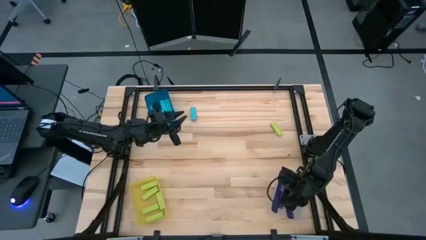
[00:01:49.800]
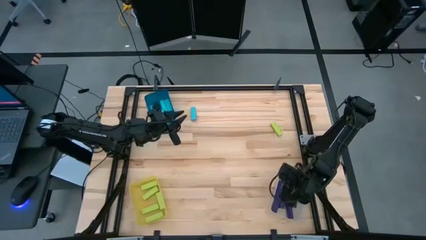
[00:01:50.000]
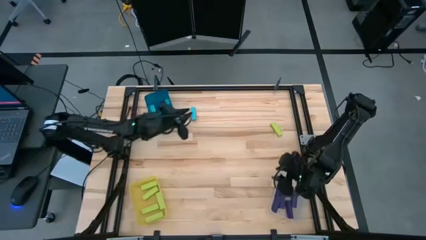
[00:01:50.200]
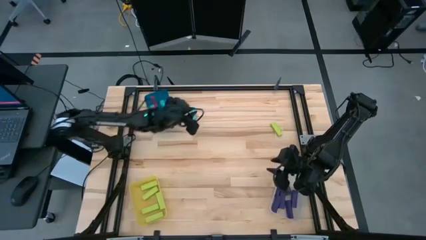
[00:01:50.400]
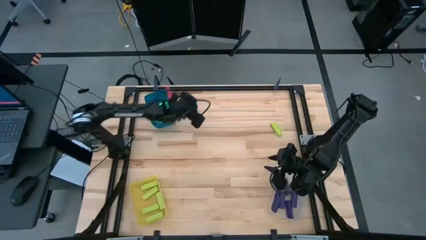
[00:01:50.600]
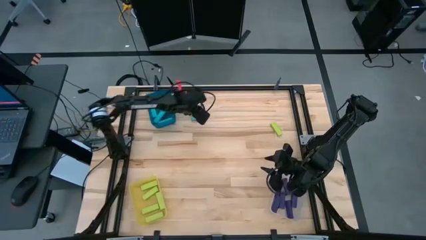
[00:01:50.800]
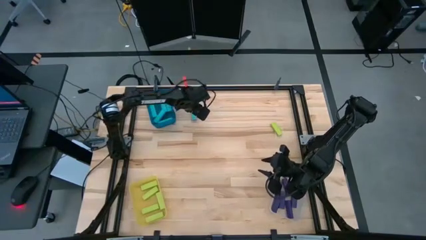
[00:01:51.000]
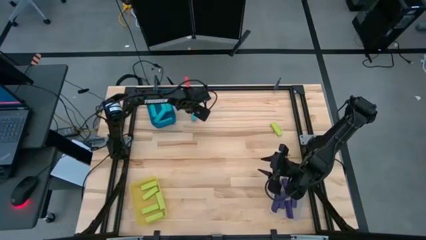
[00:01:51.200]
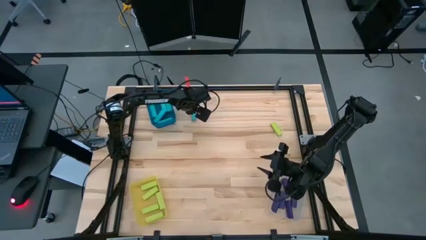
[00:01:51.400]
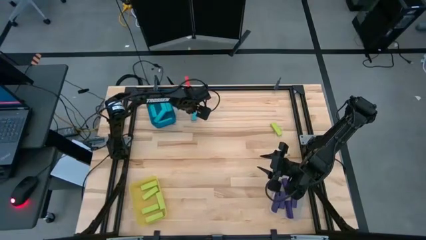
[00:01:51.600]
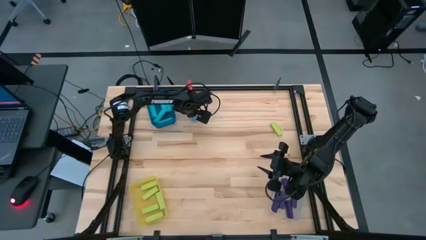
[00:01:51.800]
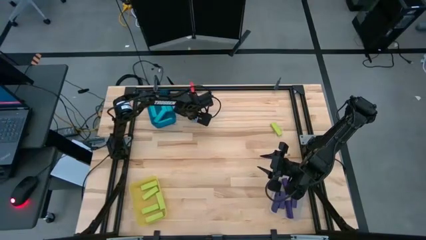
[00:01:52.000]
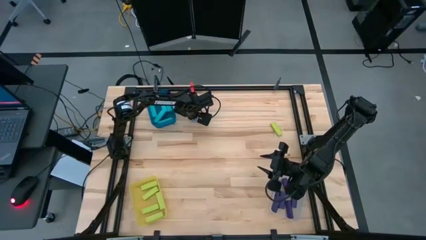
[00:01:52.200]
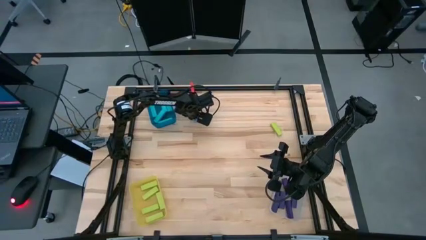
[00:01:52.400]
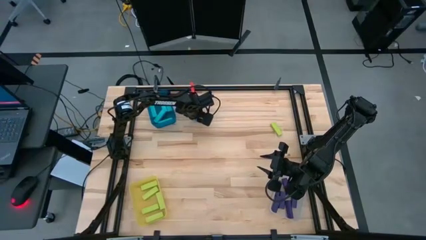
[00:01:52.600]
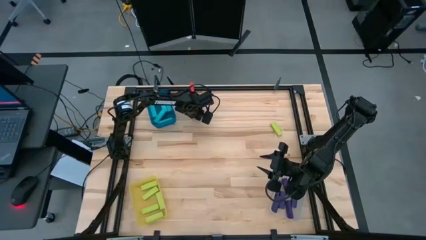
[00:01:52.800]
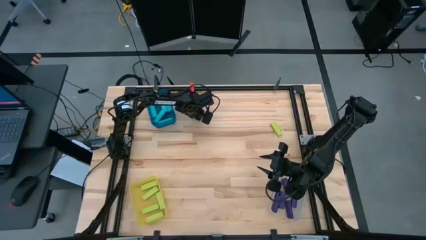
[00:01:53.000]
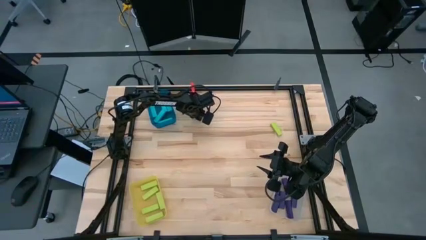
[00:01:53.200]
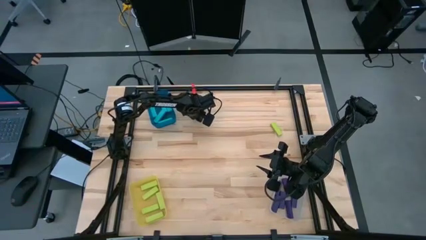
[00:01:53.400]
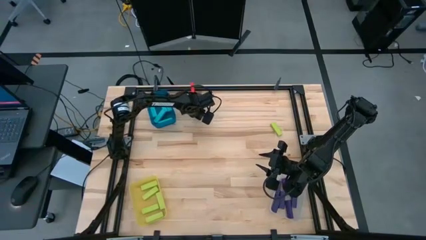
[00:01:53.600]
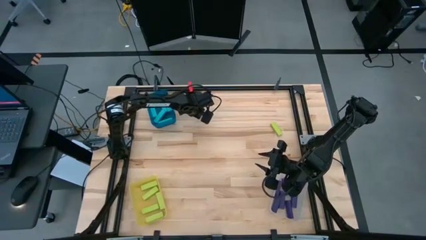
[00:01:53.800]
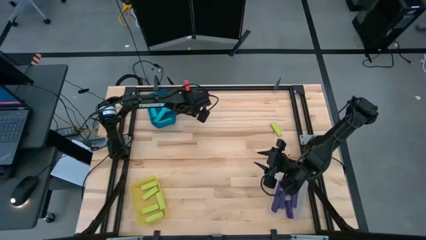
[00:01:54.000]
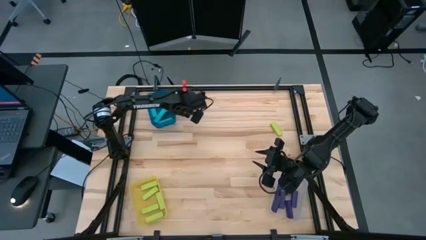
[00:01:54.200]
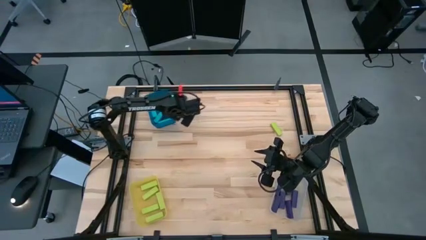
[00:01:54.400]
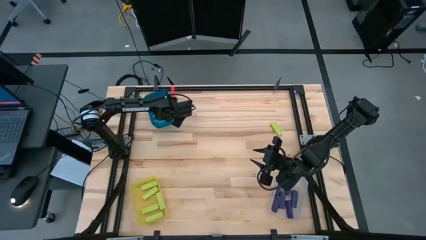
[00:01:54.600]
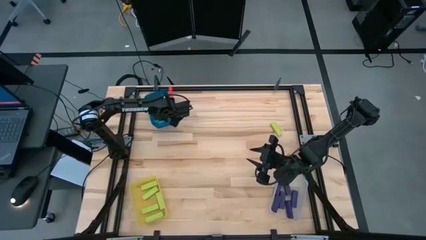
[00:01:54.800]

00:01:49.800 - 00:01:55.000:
Task: Sort blocks
Put the blue block into the blue bin

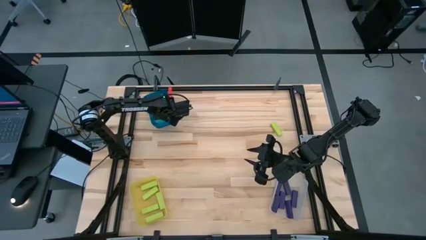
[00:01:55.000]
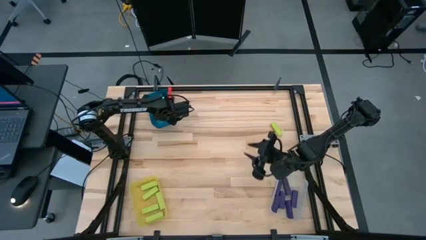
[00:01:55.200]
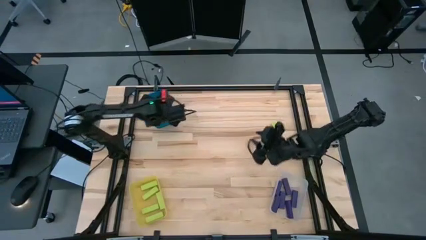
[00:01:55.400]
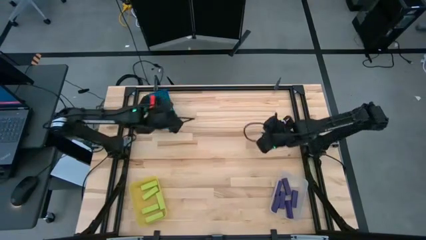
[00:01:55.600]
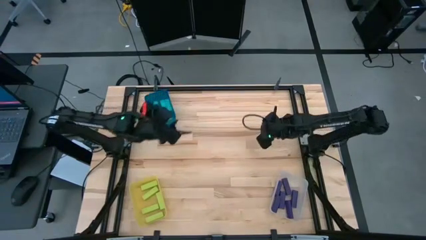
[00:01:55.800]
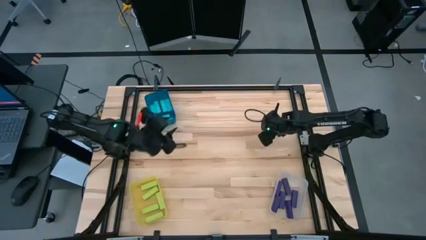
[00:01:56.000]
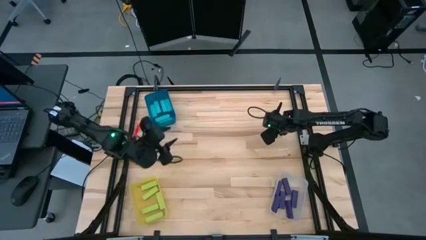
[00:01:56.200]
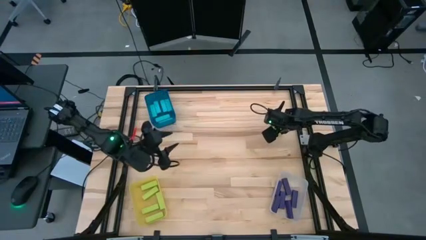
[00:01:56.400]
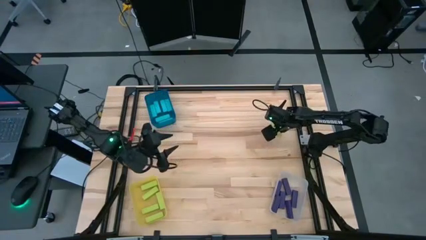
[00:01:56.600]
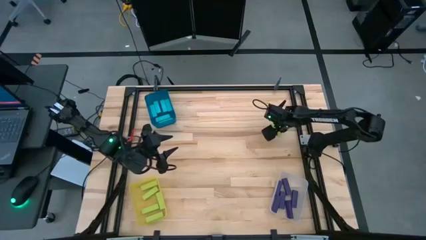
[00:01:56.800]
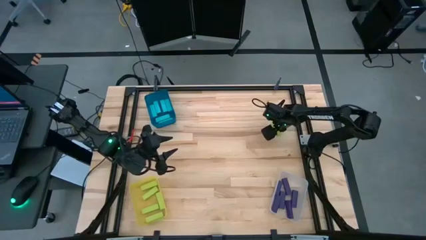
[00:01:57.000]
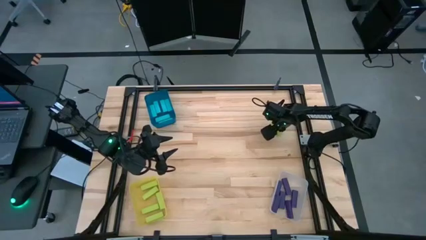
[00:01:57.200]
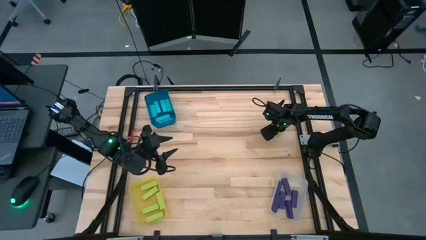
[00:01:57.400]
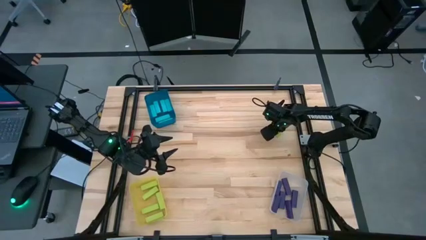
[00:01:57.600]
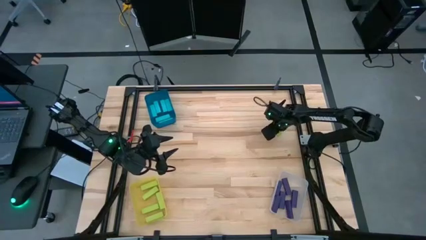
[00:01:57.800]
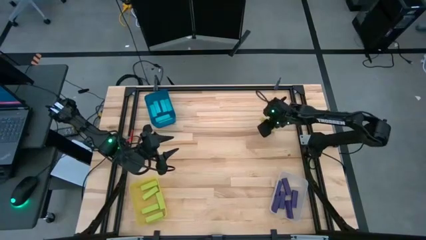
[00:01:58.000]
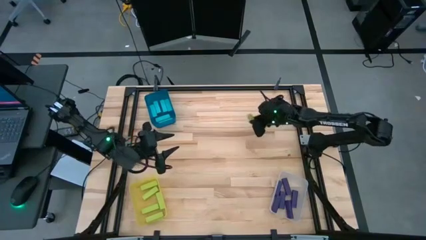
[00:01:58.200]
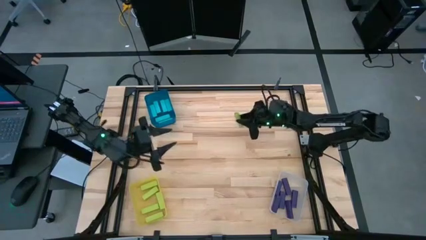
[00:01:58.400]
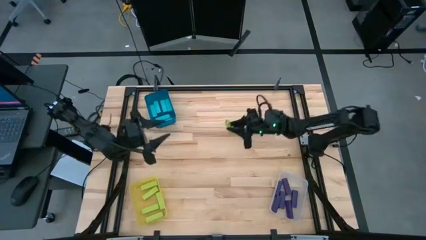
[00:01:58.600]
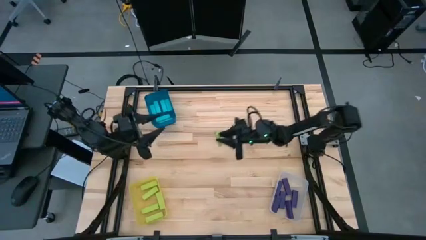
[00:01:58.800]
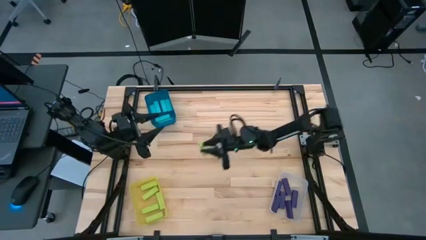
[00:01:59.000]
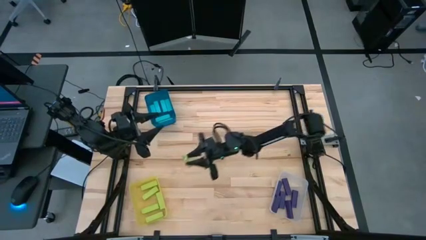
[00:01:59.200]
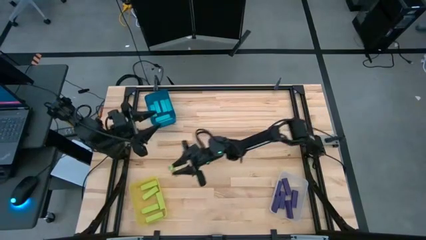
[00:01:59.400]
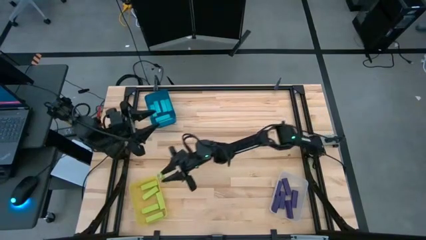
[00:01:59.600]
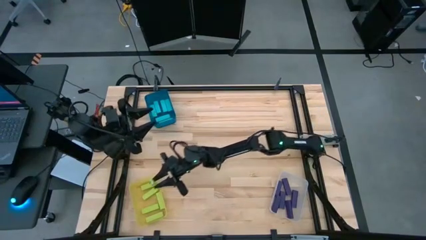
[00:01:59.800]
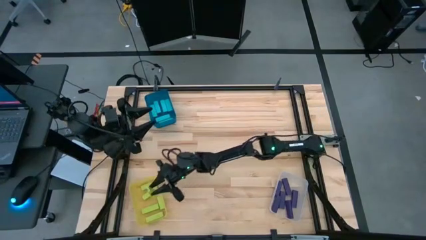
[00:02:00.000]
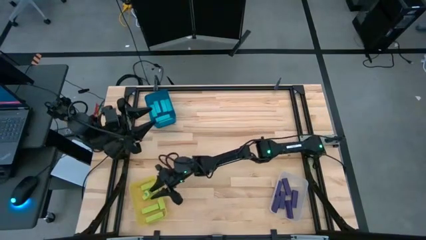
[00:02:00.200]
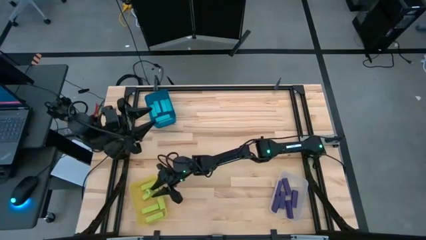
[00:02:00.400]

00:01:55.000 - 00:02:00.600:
Put the green block into the yellow bin

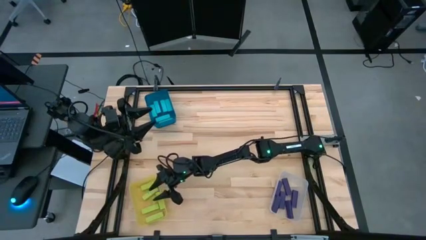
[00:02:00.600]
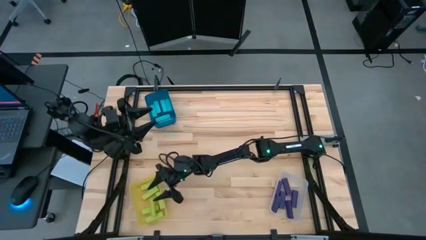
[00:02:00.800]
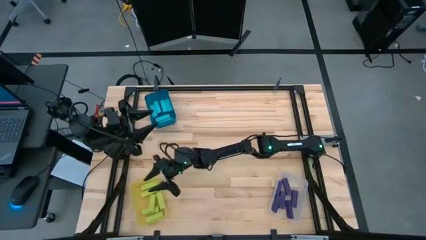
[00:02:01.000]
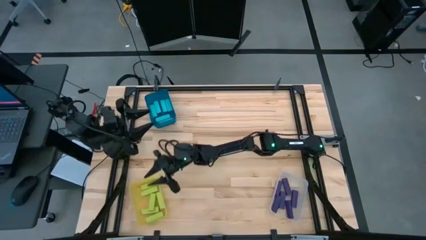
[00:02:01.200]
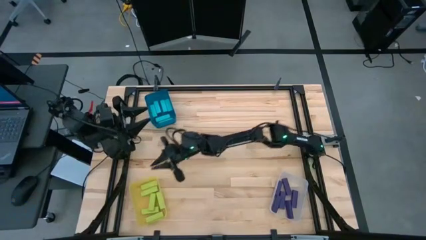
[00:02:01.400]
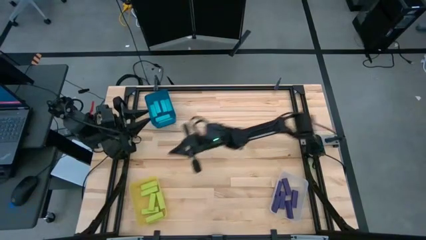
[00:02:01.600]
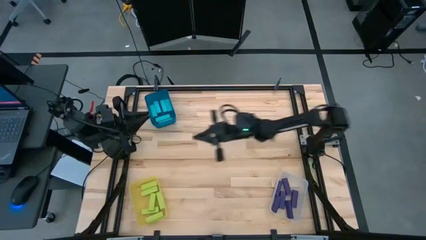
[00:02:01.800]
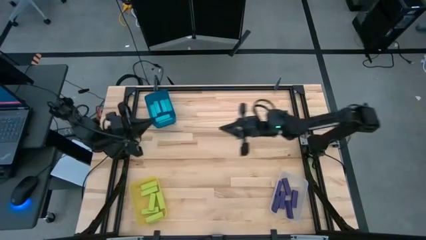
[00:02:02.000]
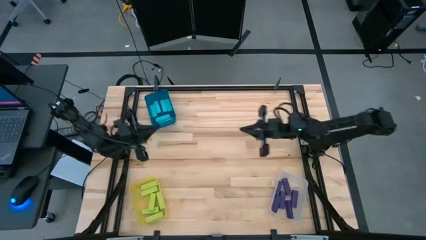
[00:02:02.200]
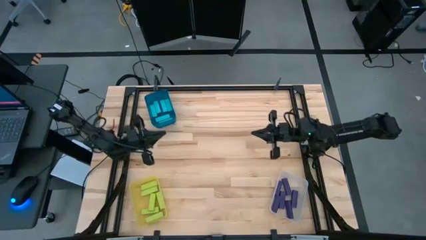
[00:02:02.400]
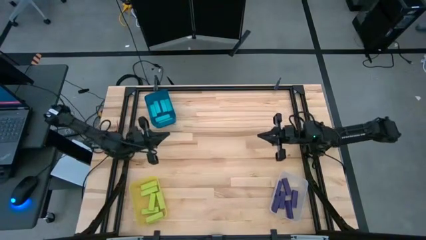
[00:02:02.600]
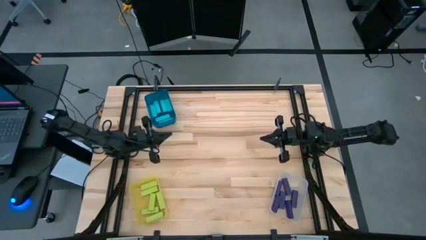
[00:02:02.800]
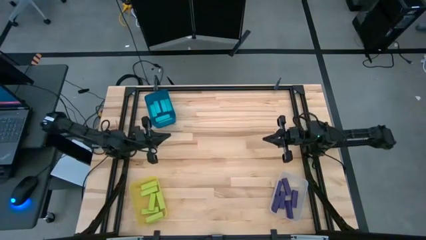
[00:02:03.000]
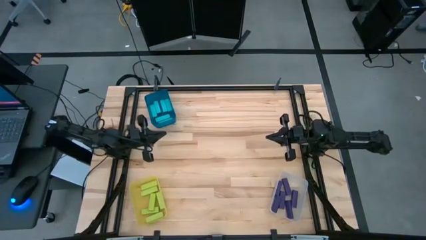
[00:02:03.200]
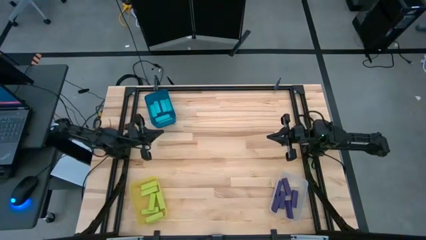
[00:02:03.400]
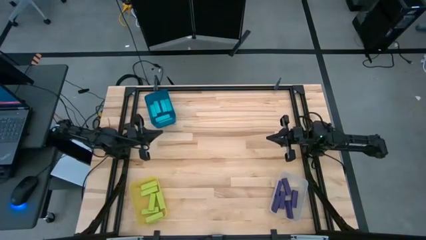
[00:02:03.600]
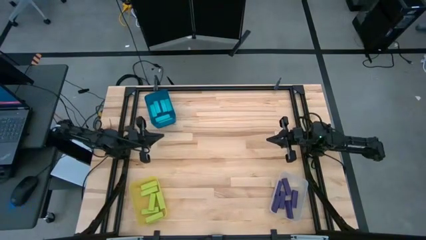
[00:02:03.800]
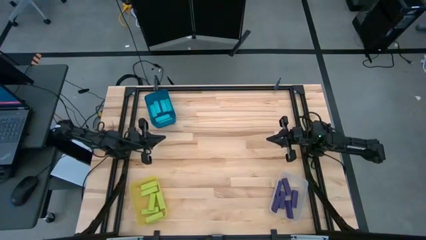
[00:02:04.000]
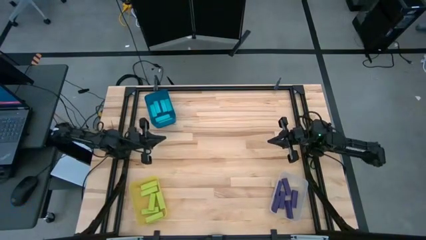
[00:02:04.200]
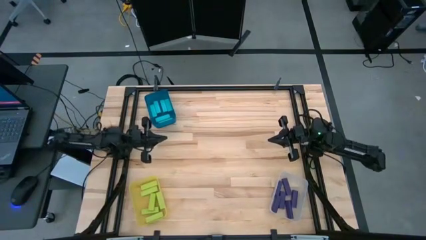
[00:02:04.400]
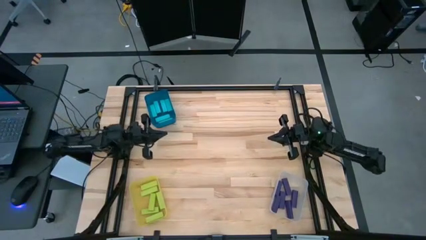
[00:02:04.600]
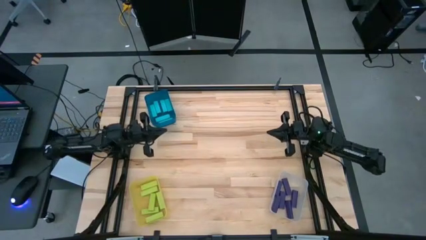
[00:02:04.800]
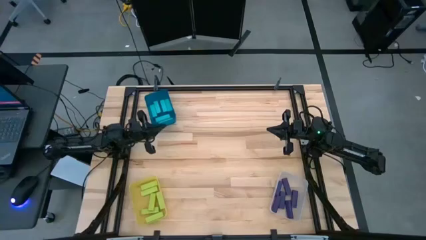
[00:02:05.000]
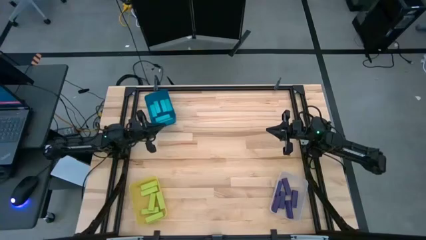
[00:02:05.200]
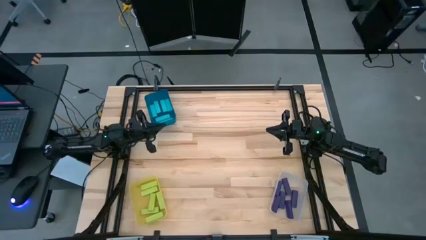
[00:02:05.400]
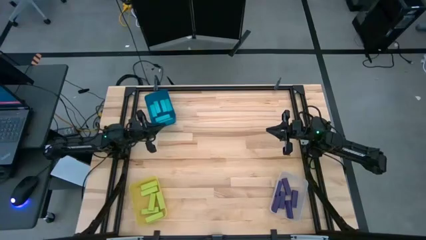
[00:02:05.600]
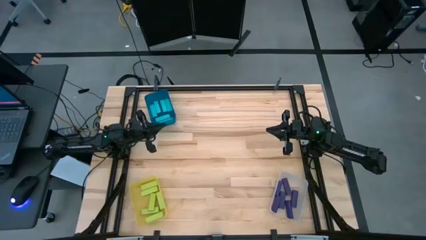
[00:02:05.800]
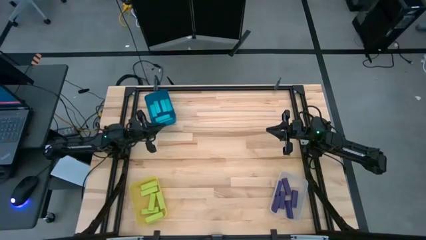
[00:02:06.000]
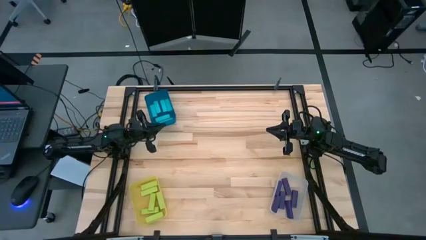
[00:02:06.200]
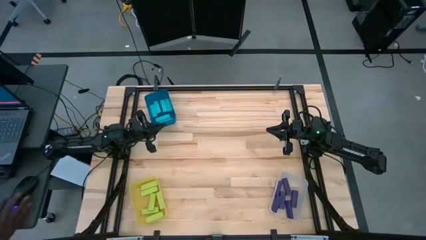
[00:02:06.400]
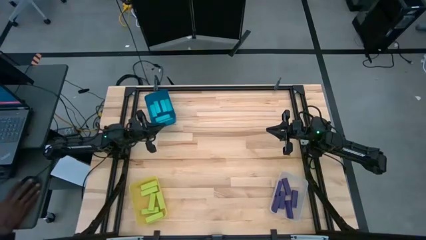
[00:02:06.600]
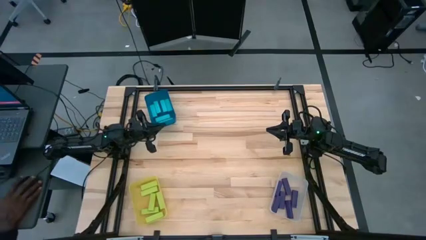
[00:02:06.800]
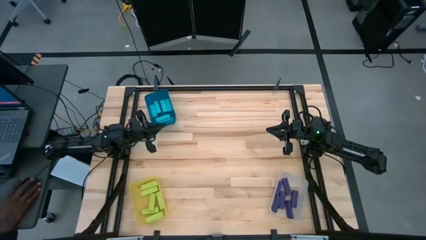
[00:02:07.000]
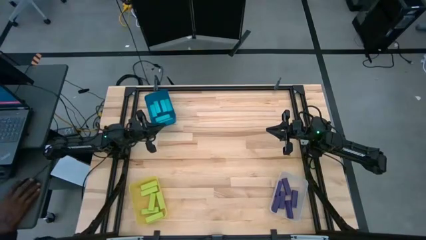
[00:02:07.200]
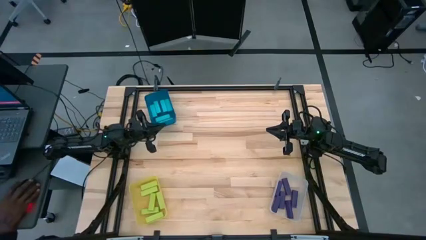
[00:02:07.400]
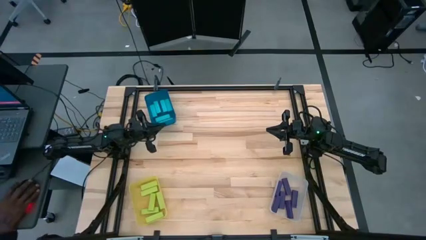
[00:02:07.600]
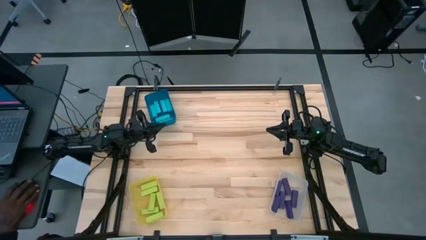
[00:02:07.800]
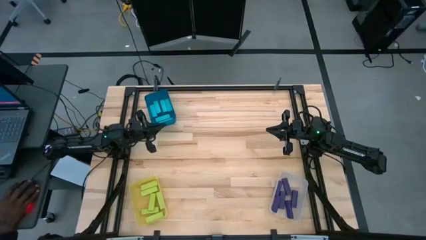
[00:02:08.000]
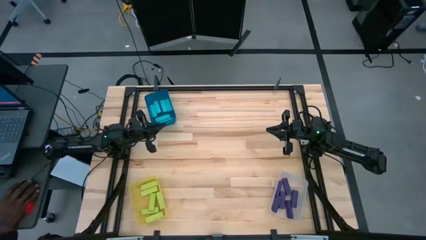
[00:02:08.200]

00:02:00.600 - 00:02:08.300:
Return to Home Position
